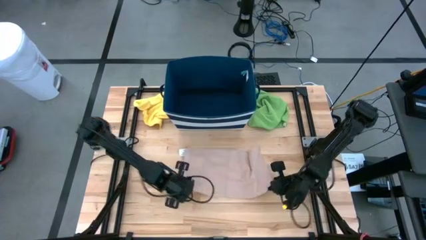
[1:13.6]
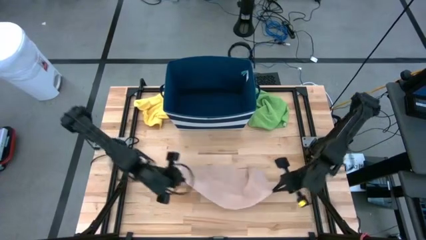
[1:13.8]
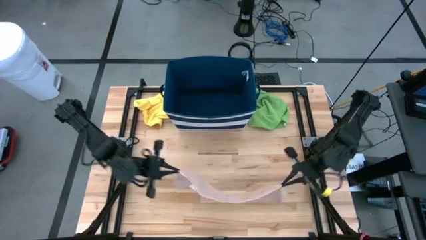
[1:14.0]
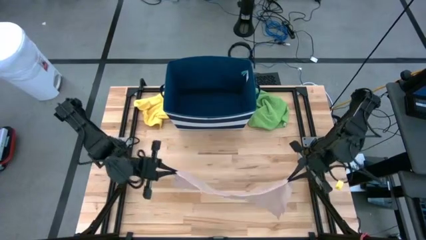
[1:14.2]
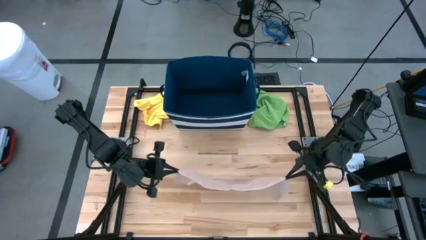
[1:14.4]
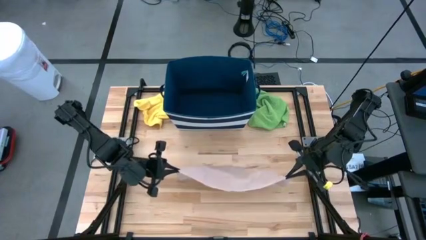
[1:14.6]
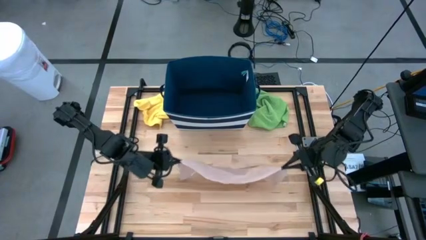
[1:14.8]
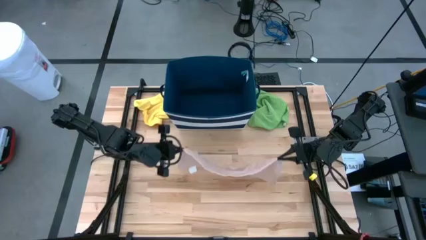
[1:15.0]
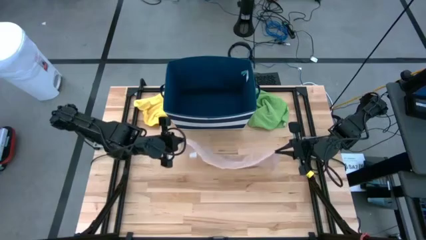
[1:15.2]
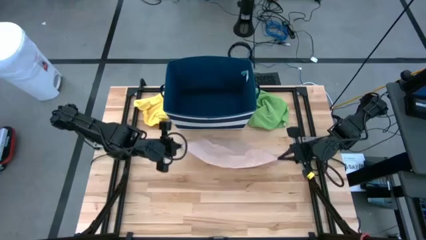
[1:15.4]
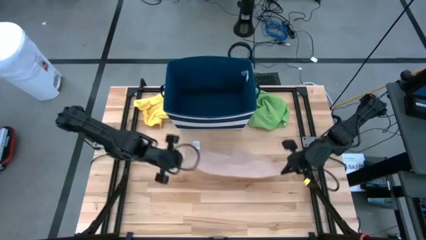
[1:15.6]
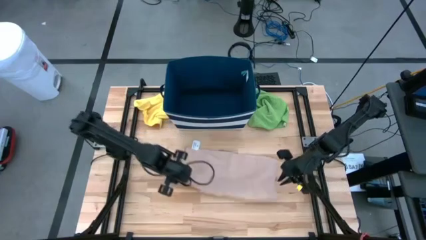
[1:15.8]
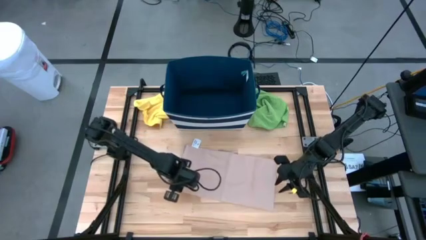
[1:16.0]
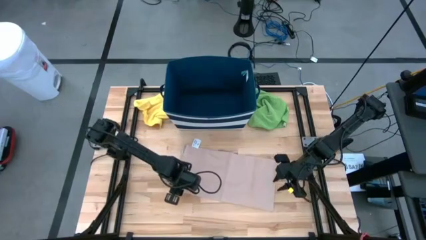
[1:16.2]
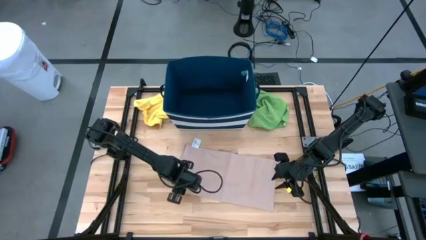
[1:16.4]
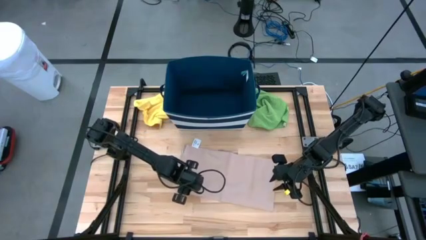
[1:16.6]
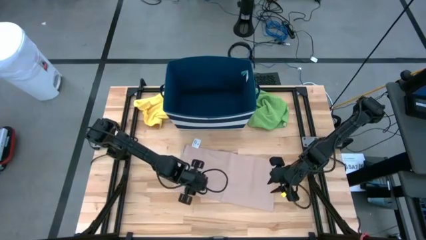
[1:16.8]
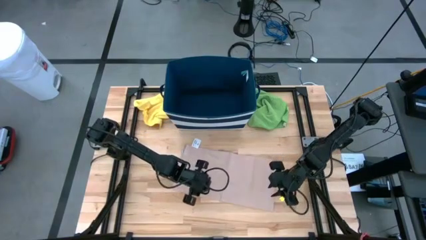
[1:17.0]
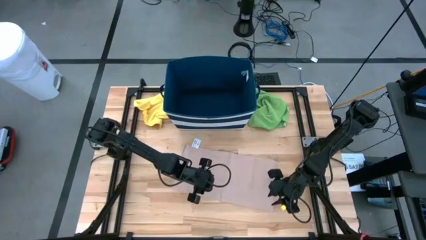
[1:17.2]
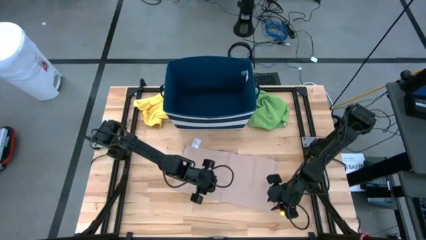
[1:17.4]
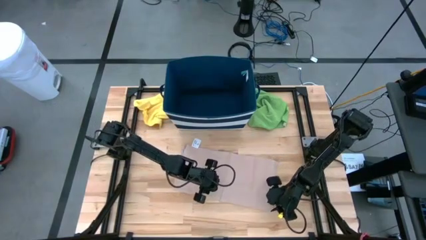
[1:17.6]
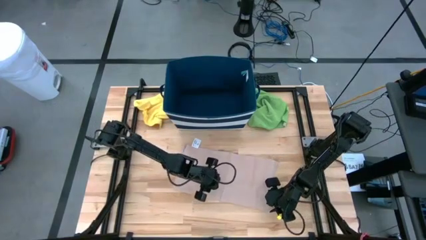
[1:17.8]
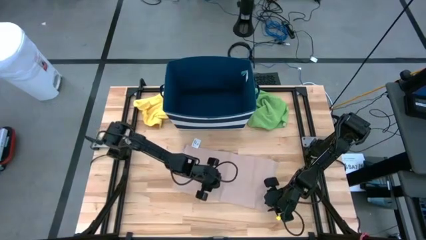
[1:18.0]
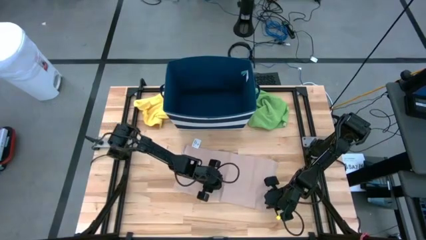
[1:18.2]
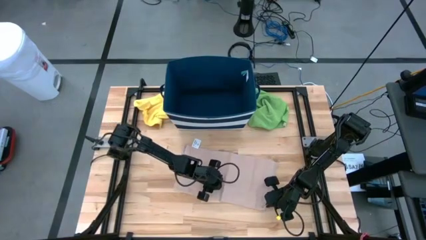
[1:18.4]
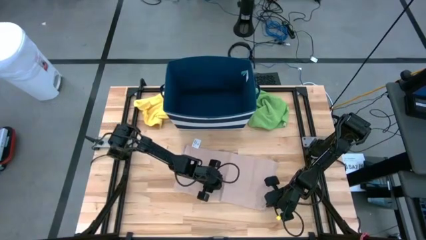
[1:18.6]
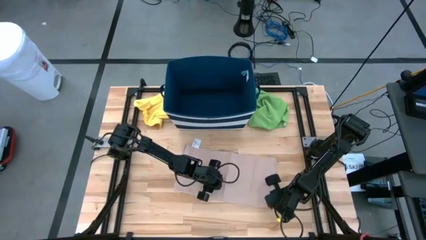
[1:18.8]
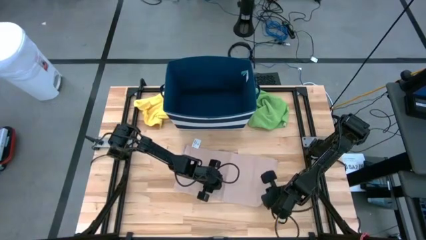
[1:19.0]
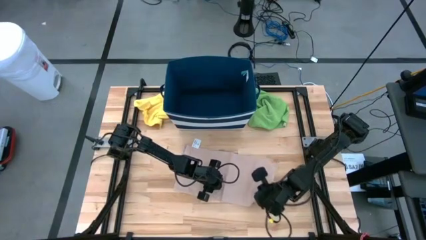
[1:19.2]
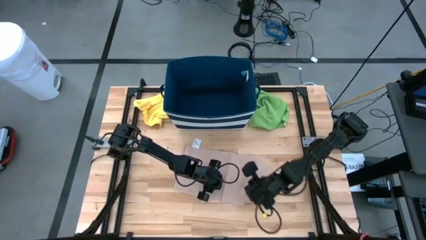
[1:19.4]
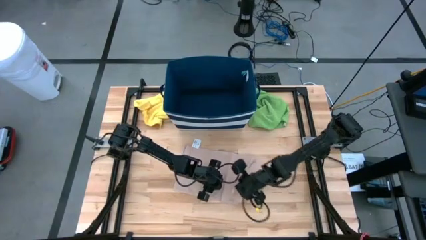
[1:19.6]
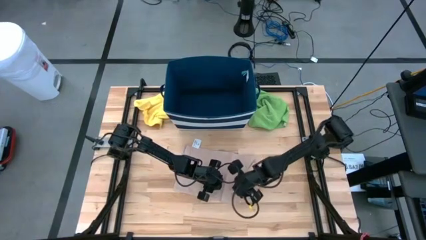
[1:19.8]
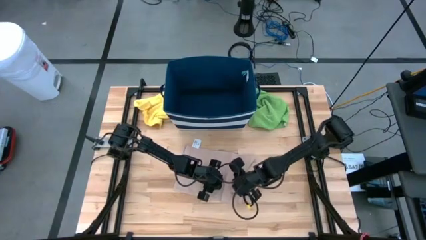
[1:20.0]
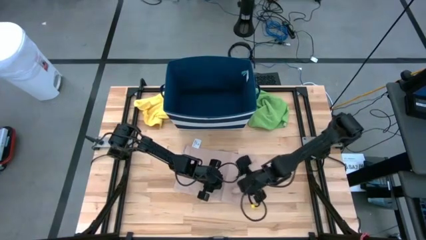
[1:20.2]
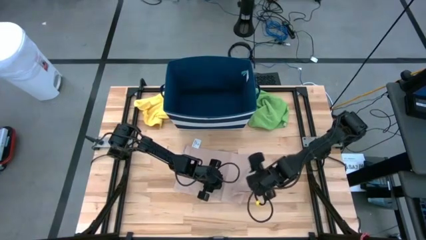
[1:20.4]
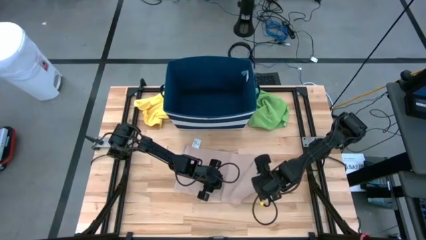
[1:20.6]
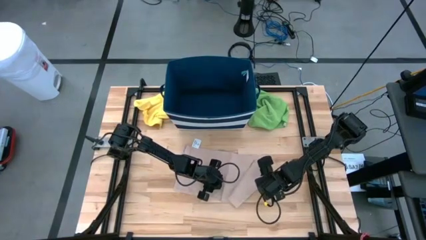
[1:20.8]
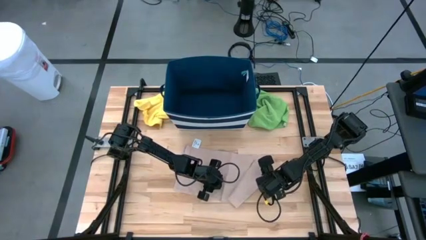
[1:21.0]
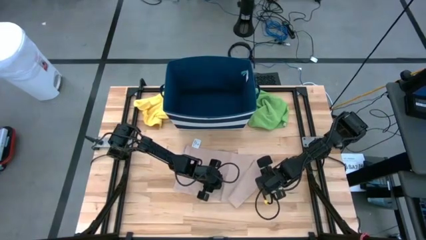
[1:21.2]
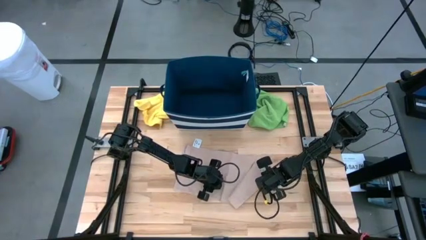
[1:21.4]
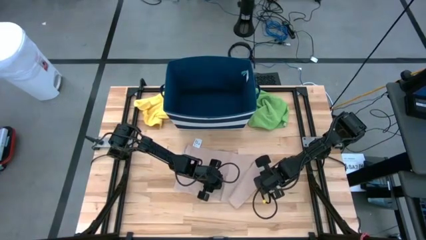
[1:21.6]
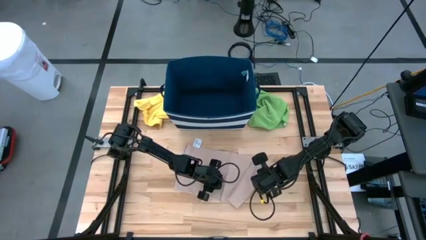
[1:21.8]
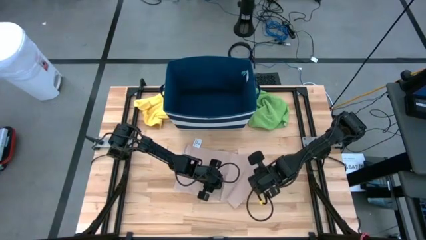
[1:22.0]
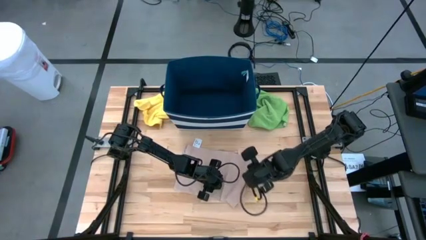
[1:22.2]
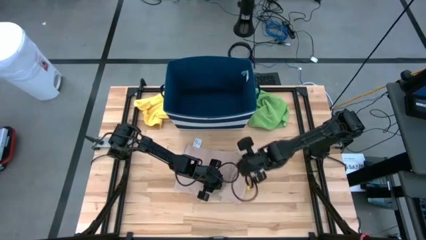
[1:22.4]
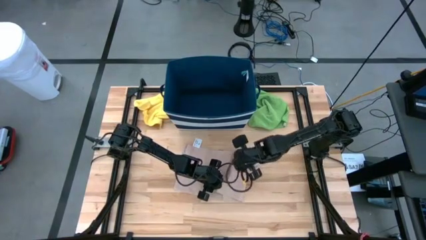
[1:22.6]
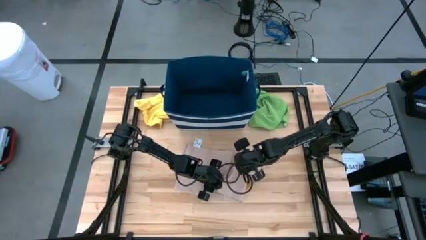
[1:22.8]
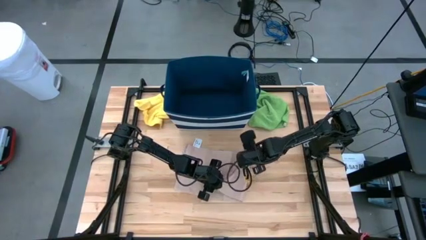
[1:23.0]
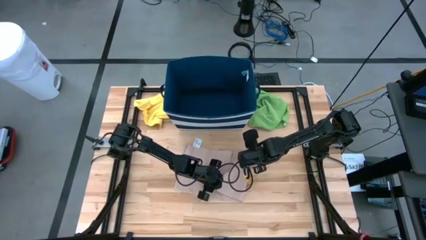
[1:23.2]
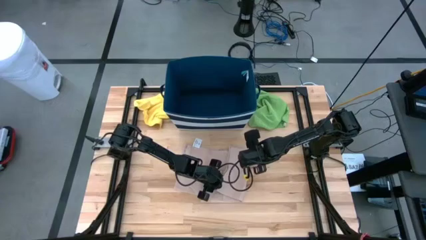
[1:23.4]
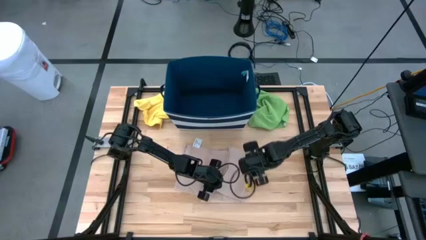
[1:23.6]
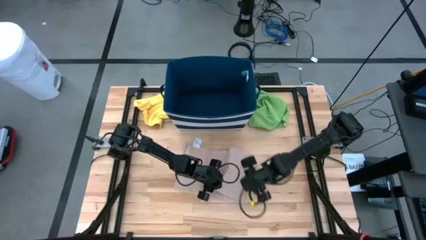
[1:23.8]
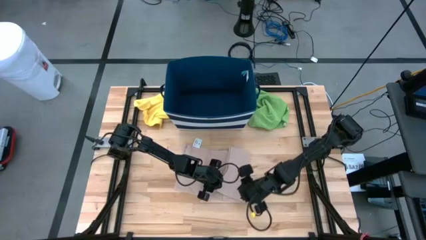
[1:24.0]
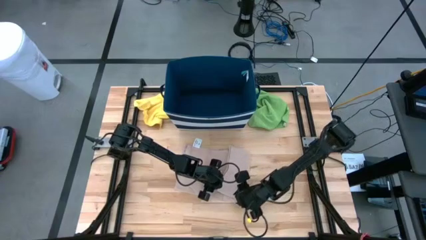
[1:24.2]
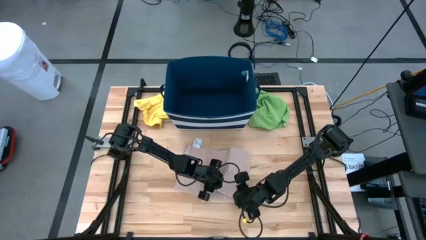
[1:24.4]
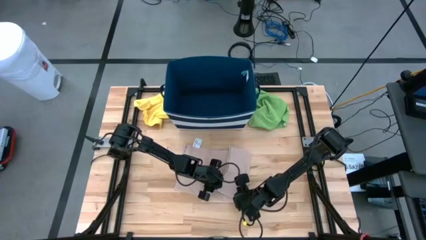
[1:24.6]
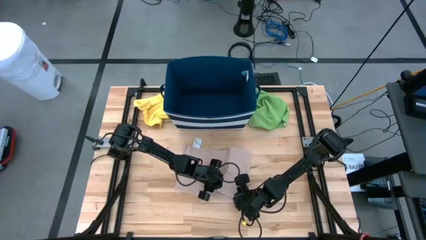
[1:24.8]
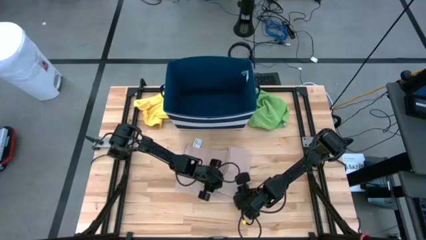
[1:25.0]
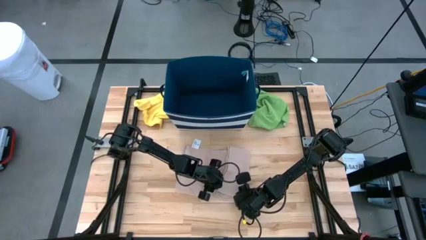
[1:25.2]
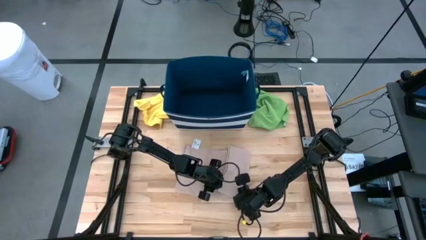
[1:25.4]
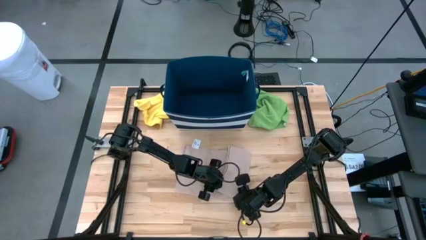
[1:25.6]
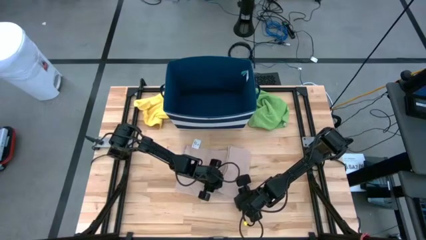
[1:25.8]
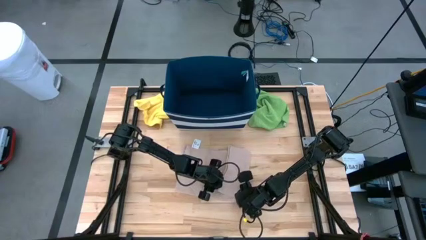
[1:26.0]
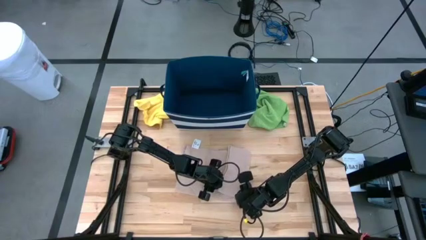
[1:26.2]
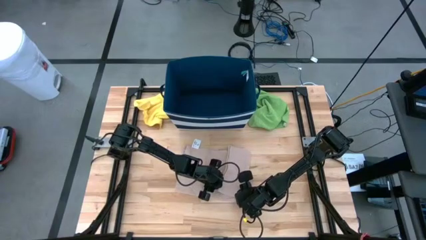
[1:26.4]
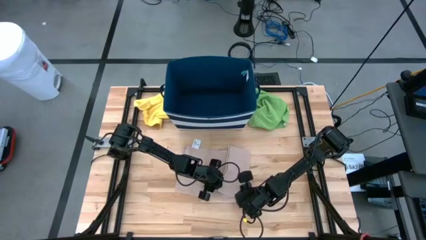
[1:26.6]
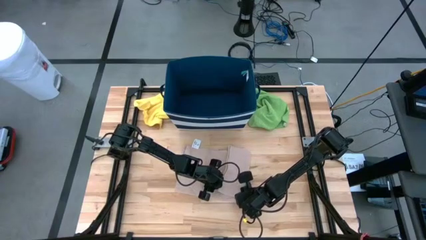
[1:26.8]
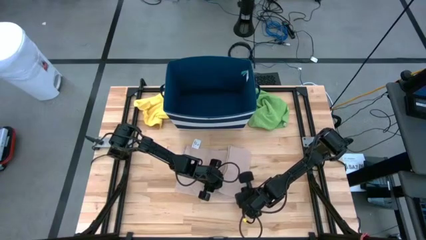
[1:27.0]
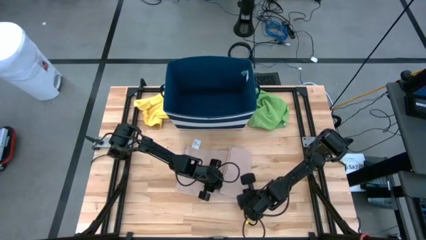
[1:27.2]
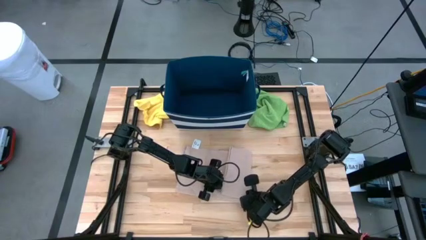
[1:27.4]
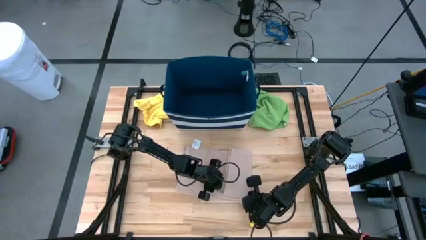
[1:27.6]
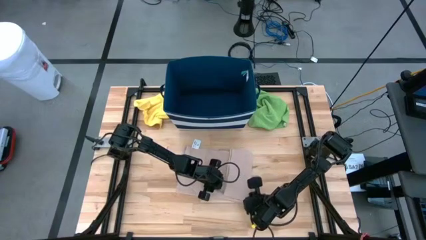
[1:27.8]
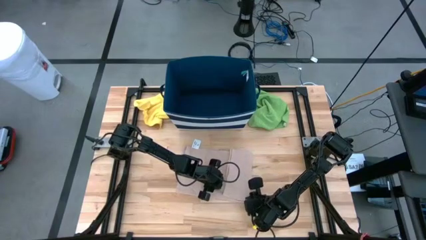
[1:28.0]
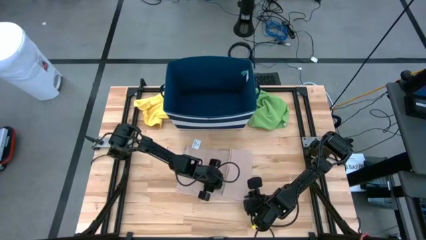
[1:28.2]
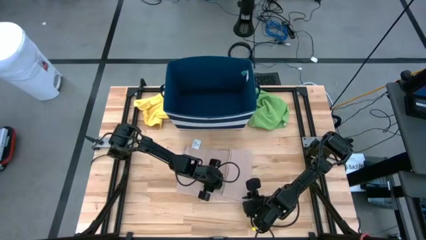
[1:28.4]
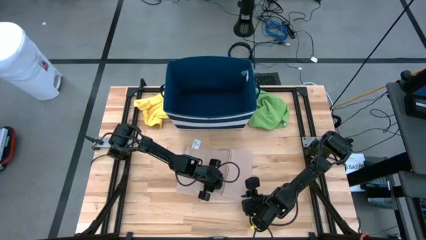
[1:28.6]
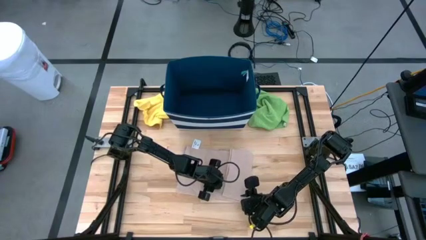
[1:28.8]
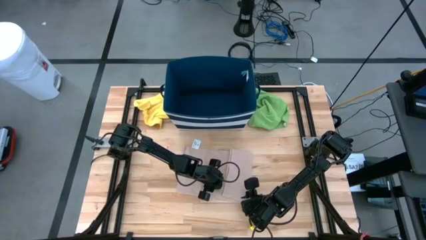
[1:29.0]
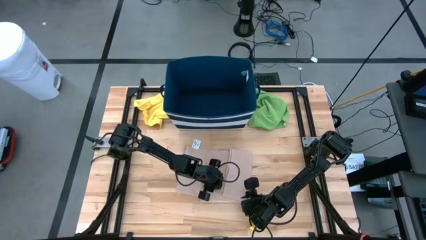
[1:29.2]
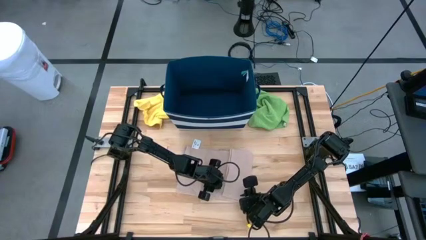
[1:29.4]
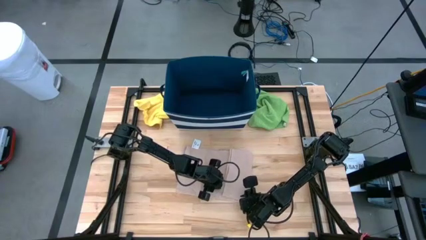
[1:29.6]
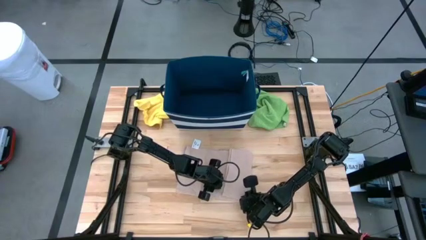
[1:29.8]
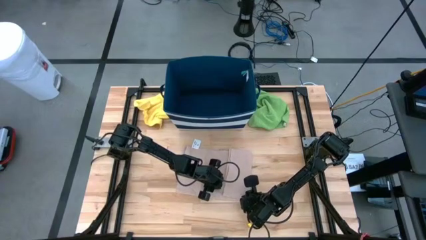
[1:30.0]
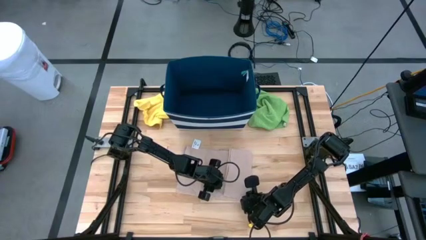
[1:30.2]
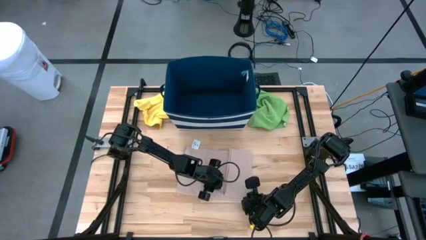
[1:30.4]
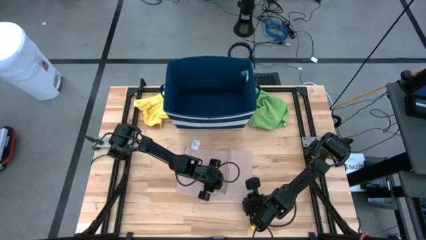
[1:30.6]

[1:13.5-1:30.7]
Task: Fold towel
Fold the brown towel
